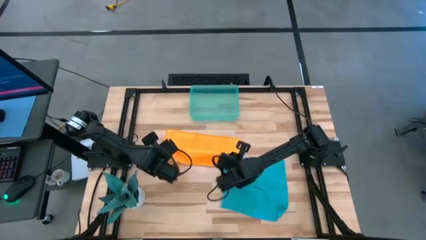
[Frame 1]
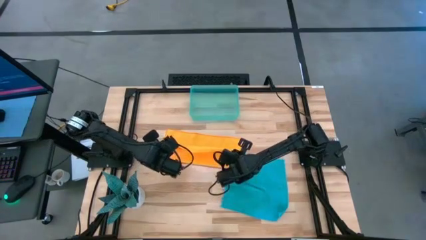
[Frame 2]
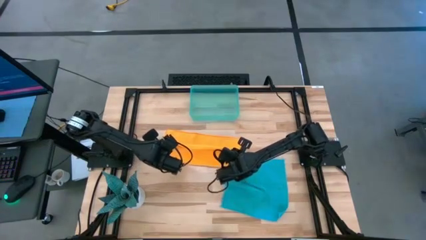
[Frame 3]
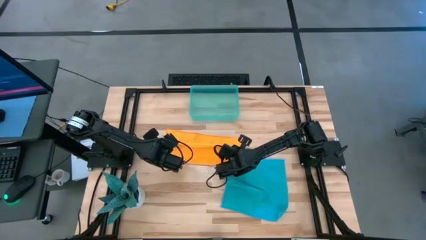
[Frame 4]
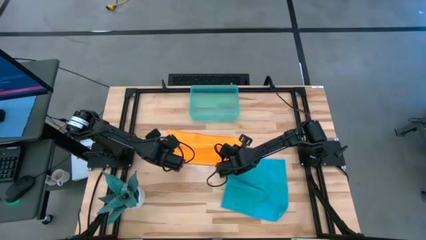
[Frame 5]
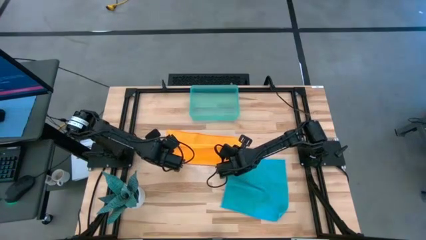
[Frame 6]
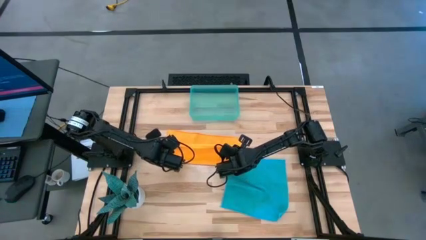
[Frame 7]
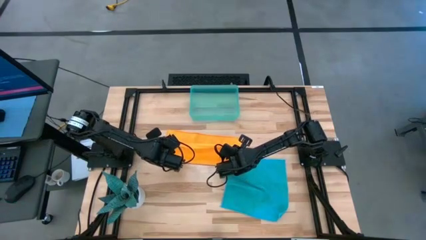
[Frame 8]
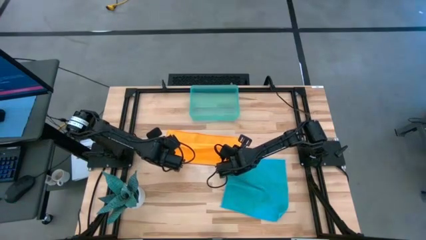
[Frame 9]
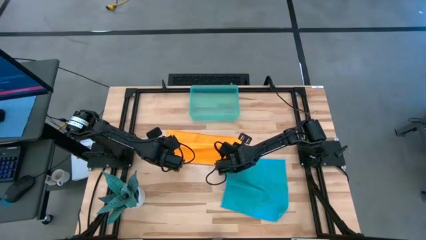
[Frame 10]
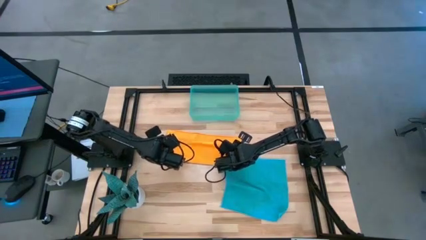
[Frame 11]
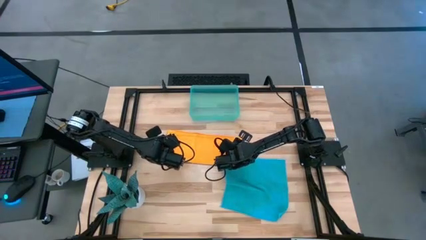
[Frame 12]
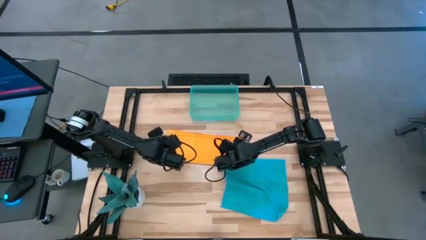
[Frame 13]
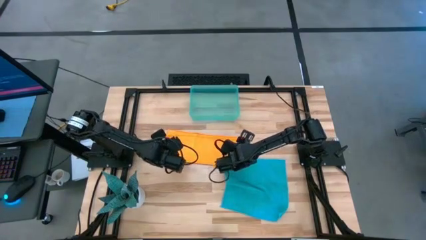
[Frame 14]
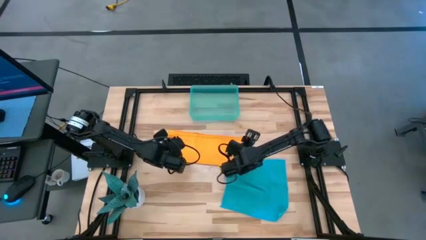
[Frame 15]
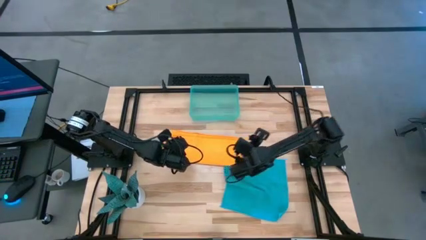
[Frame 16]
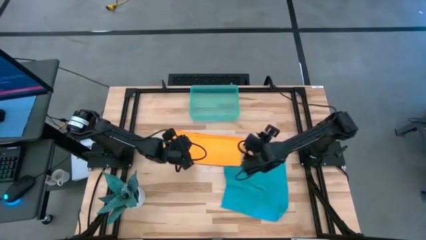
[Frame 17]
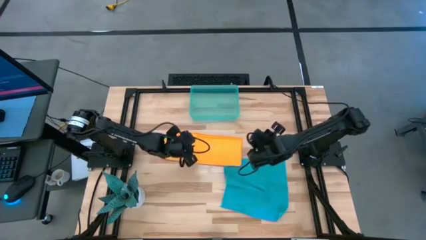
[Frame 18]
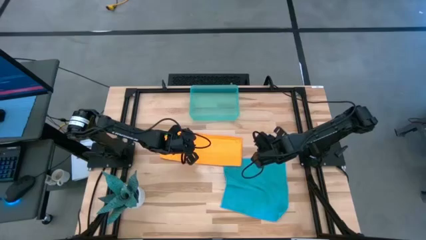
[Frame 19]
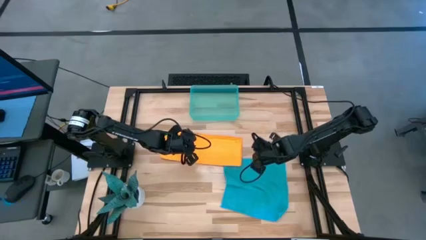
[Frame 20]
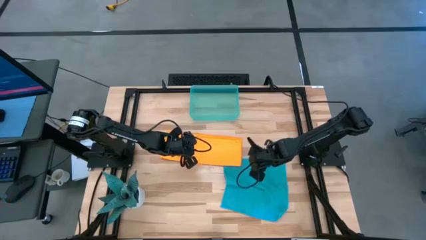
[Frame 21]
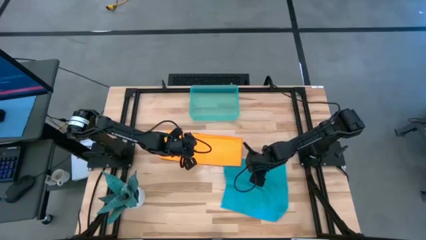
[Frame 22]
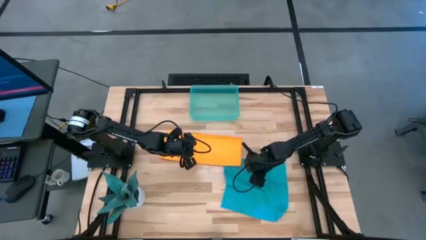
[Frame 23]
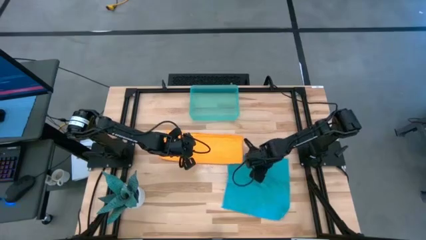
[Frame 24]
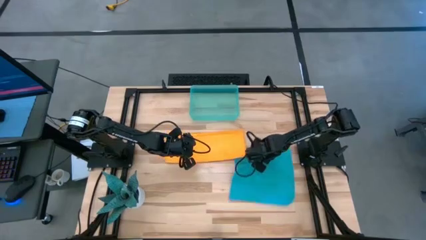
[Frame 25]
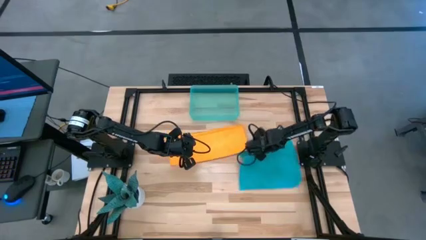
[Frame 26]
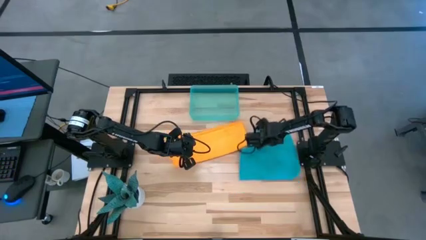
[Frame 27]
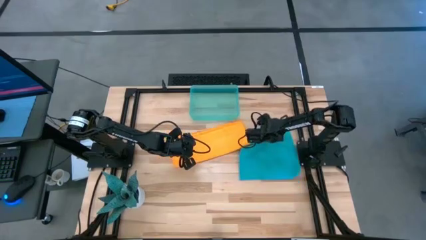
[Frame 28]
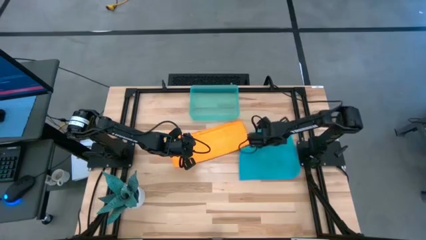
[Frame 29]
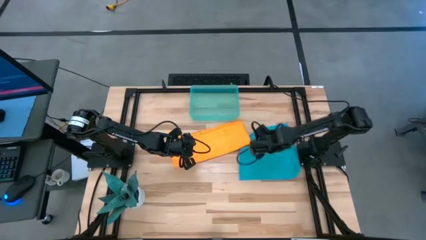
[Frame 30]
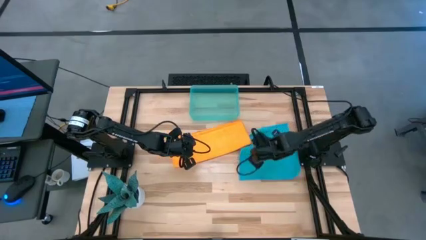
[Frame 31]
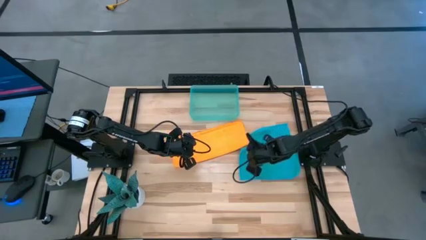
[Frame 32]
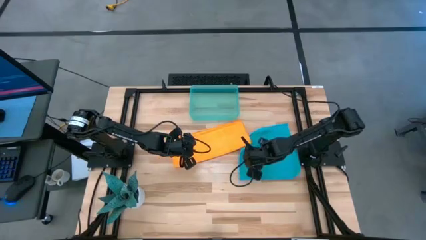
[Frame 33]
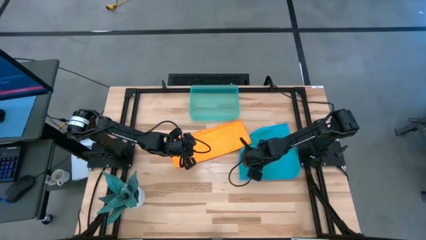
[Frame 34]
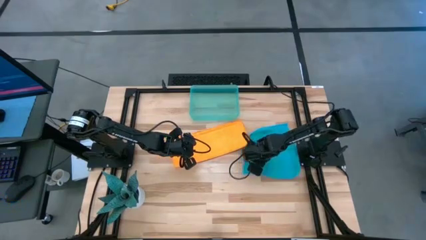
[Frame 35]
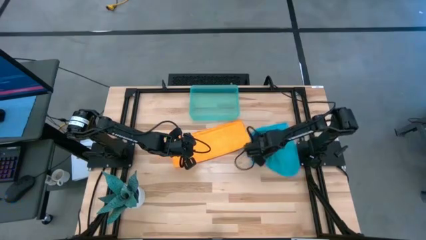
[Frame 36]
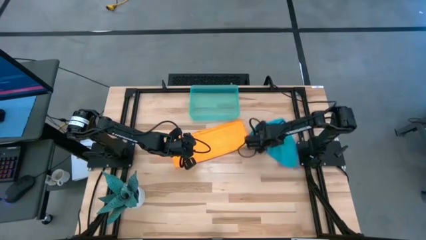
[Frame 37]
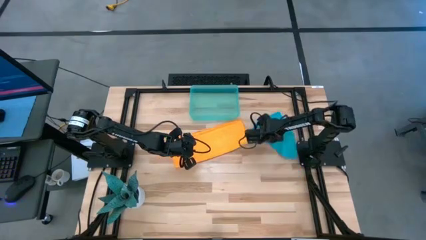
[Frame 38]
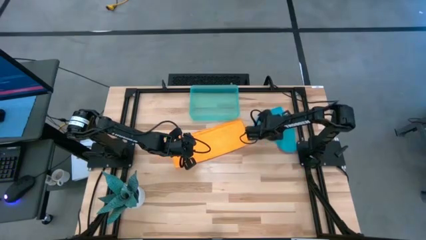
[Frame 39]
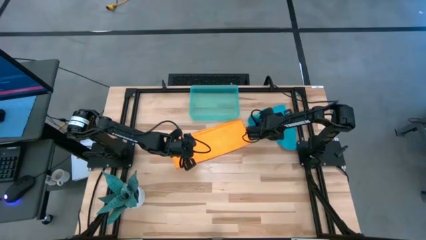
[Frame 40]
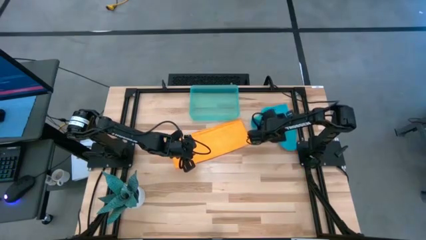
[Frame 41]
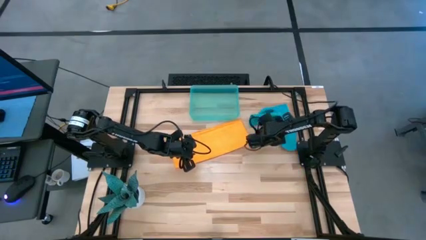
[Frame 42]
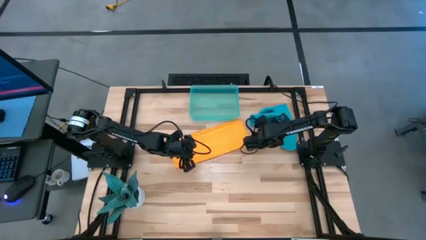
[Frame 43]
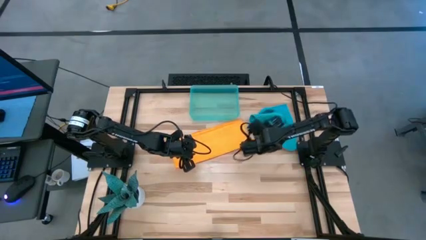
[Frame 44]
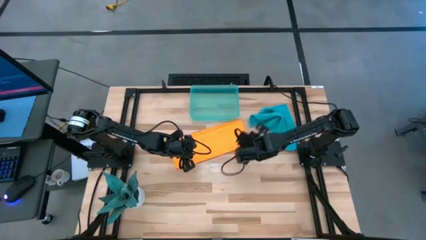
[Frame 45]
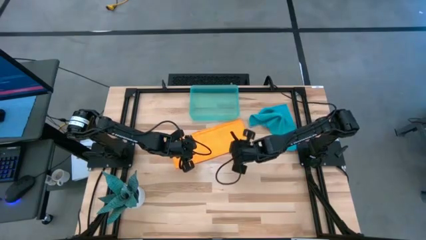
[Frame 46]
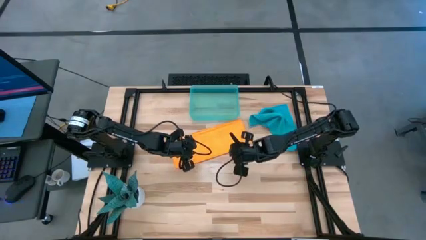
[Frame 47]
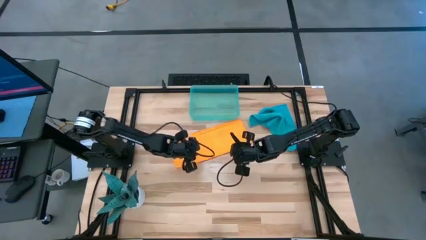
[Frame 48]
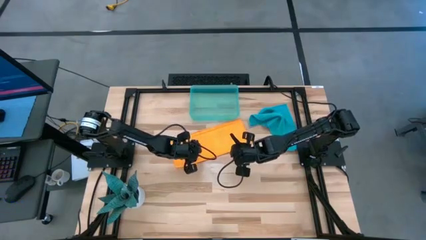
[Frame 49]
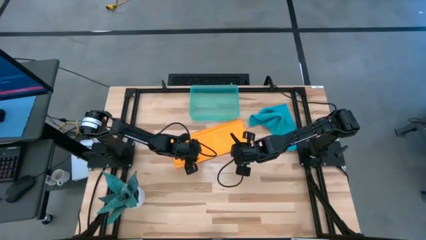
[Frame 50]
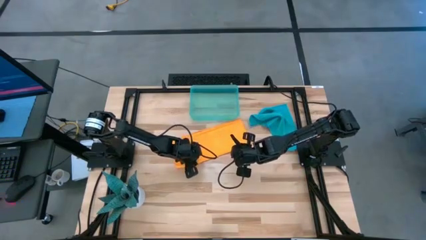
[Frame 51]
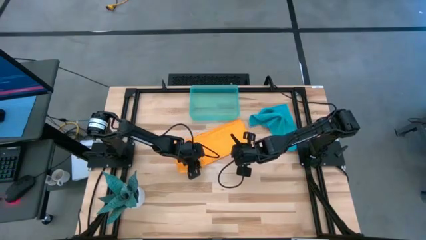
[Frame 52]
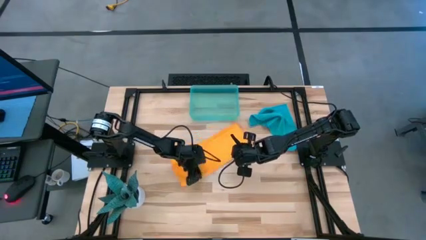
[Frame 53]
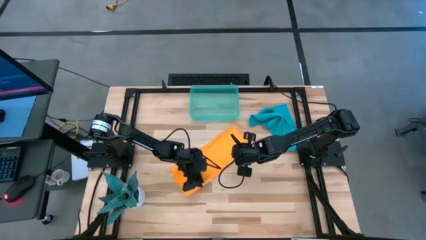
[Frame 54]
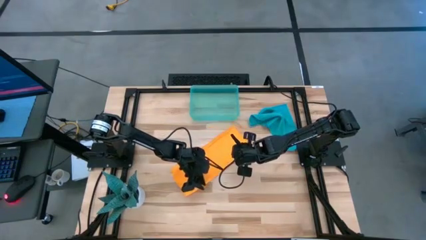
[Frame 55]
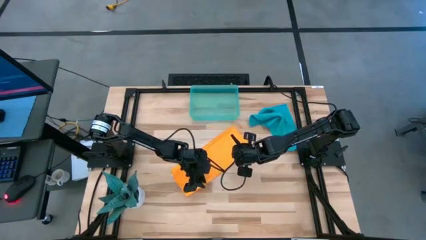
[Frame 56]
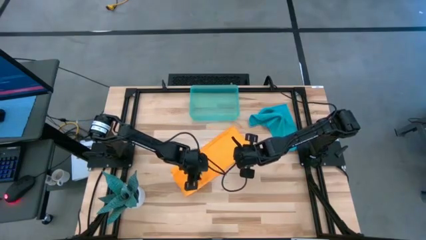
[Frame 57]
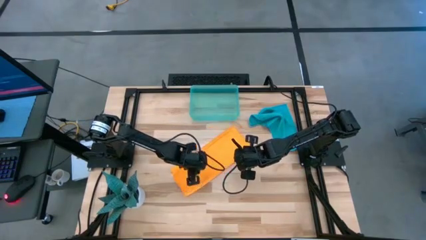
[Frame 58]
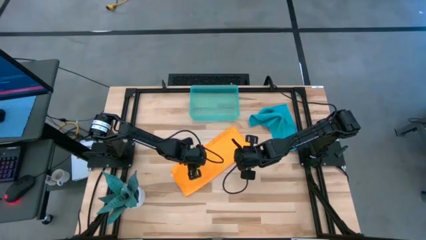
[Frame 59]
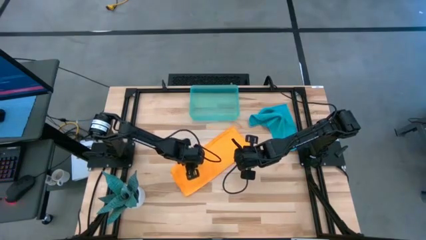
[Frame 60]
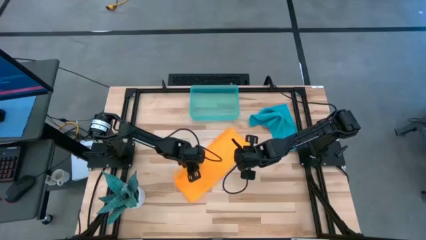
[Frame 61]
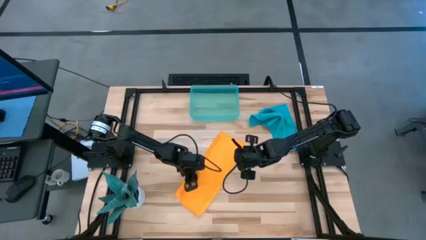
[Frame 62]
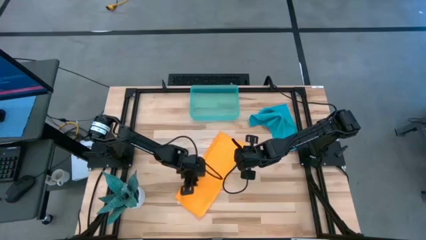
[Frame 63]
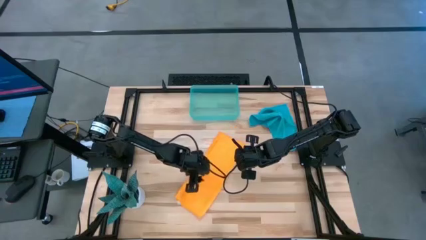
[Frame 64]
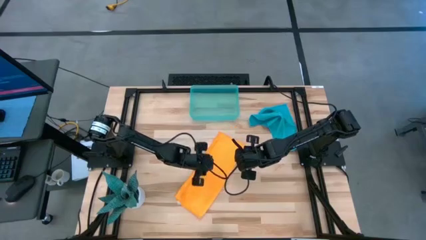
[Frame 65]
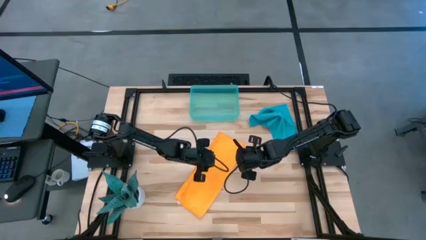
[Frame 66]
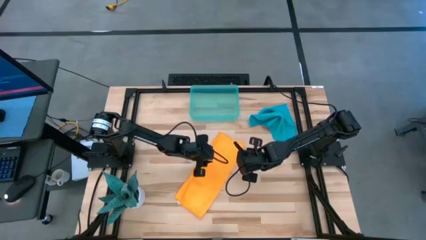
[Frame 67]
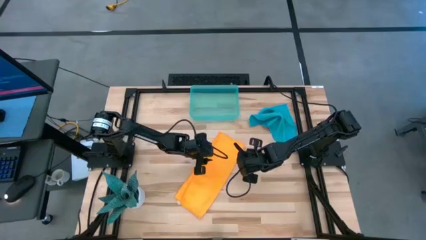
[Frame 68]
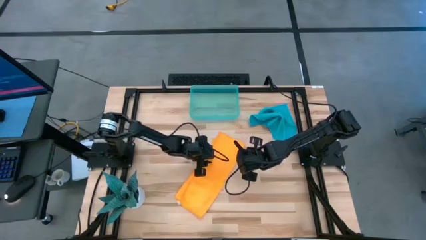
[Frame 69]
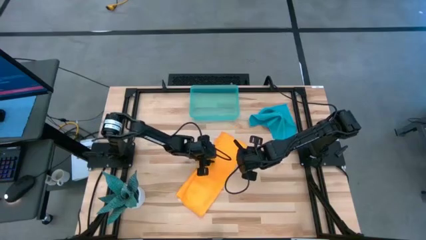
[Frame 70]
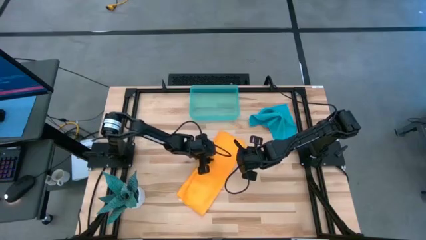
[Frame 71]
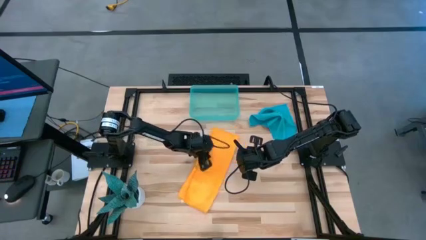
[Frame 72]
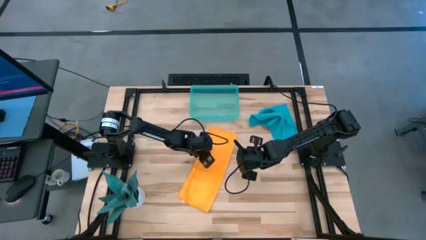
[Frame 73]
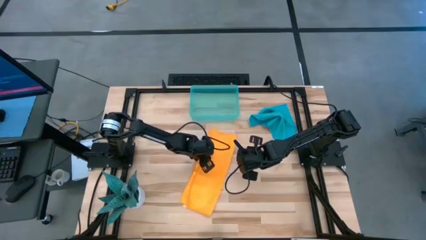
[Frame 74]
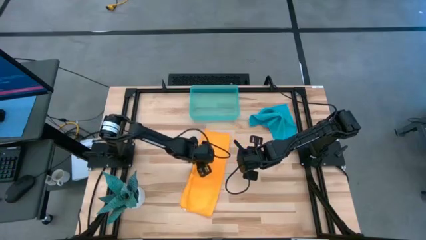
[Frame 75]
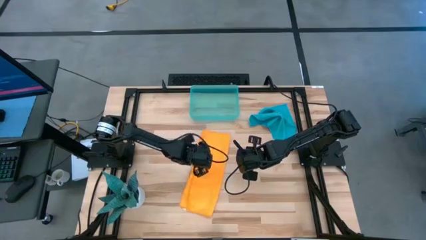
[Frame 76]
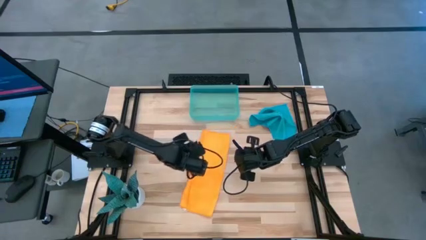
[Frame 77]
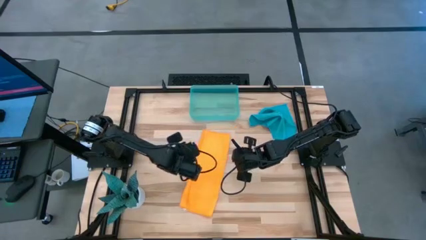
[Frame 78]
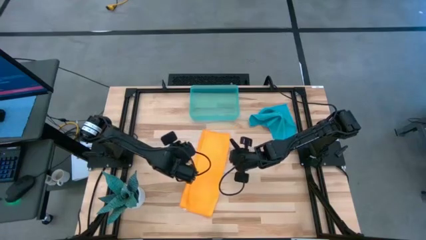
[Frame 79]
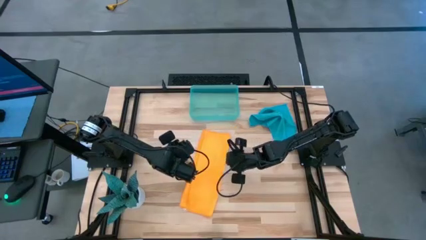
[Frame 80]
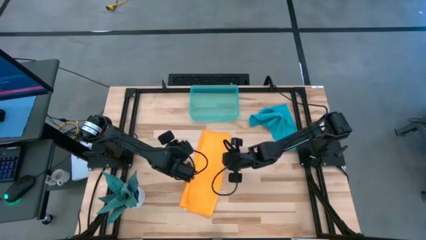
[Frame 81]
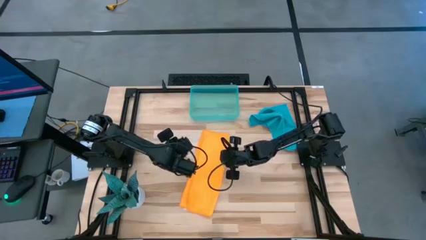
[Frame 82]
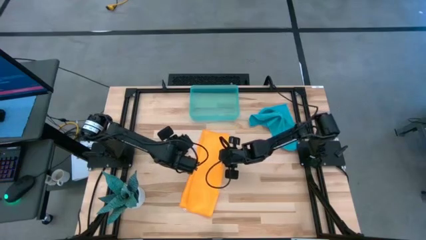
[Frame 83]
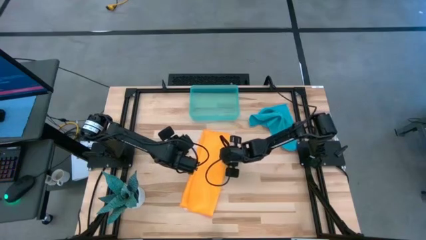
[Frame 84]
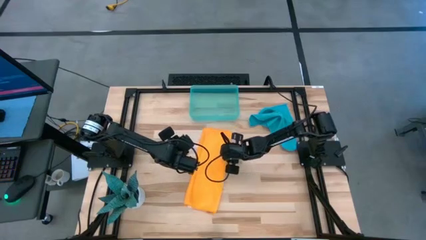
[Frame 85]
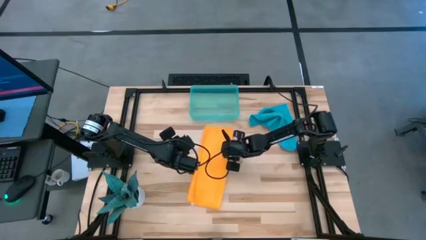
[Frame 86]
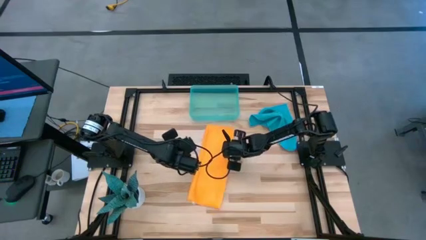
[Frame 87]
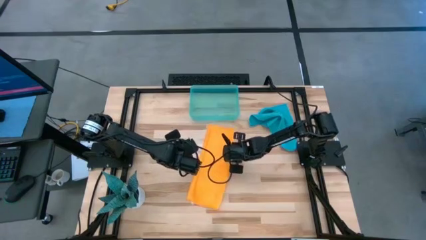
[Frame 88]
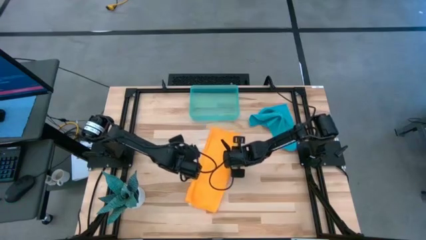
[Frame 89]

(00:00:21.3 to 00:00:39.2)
Task: Roll microfiber towels into tight, uniform cylinder then place into a basket
Roll the yellow microfiber cloth on the table
